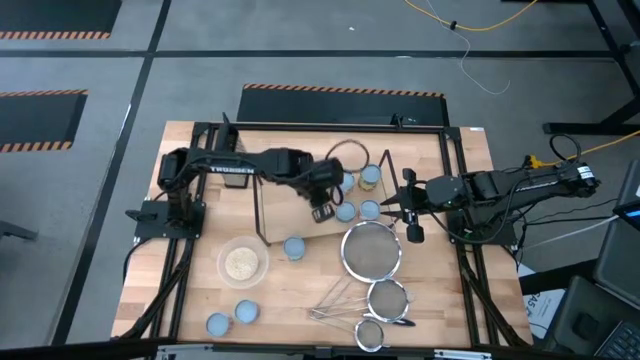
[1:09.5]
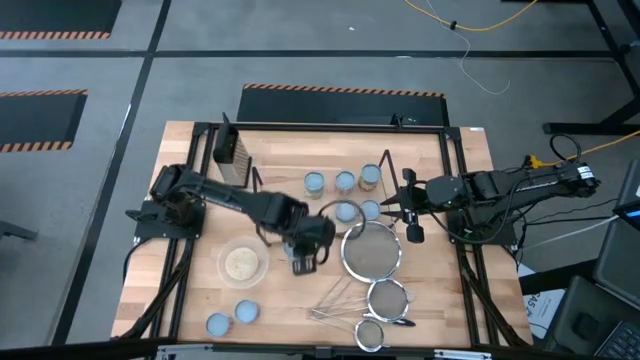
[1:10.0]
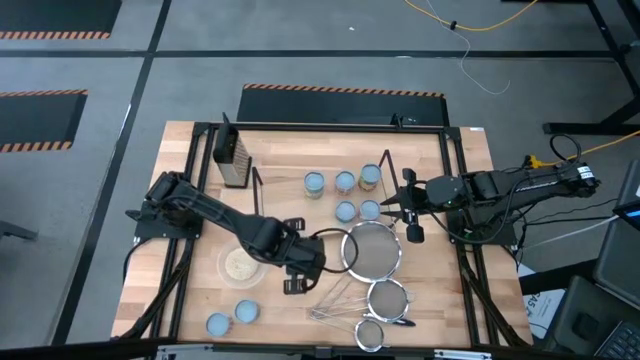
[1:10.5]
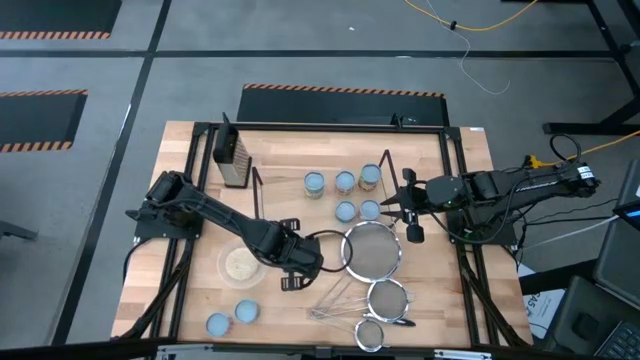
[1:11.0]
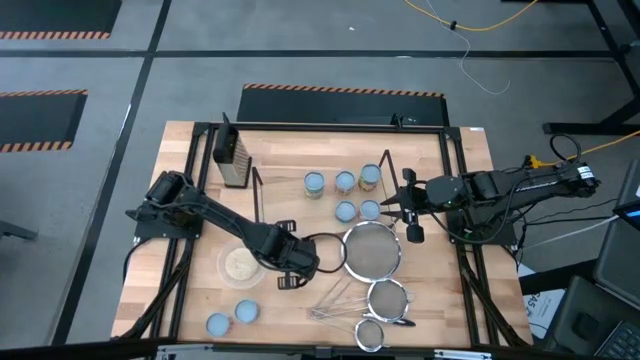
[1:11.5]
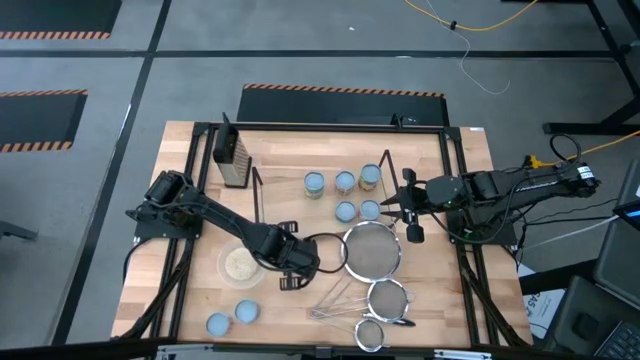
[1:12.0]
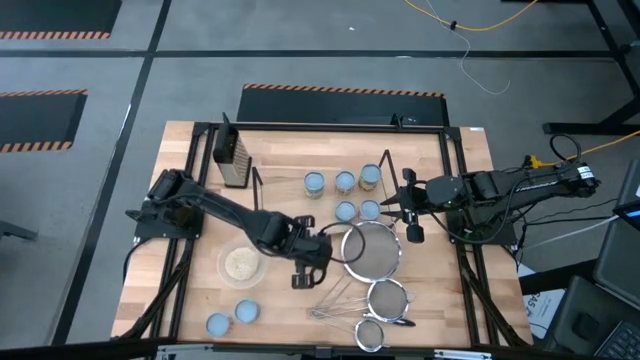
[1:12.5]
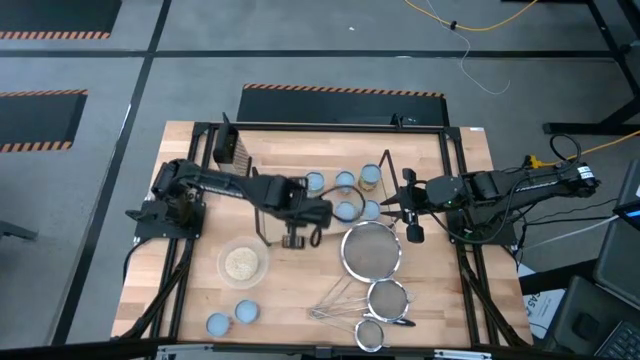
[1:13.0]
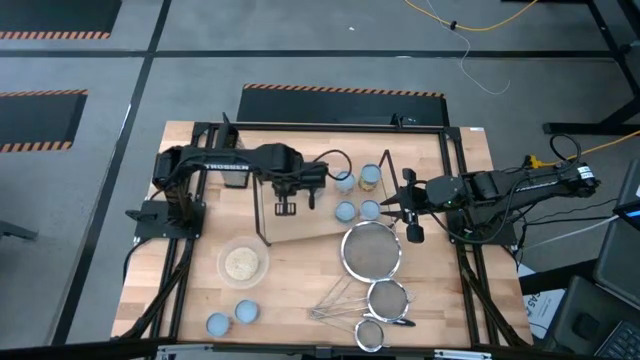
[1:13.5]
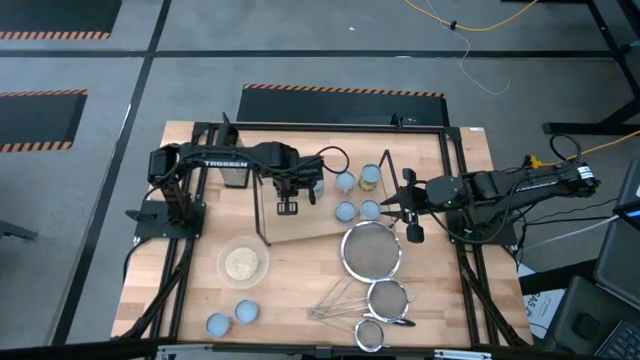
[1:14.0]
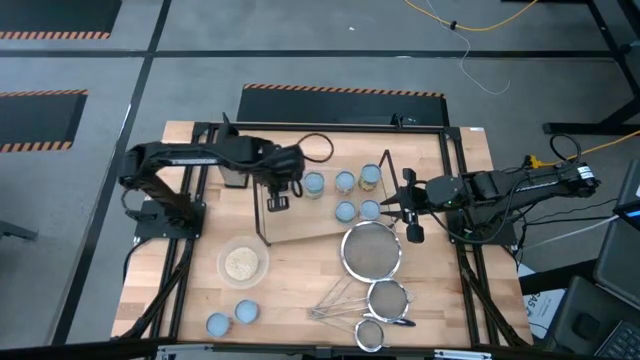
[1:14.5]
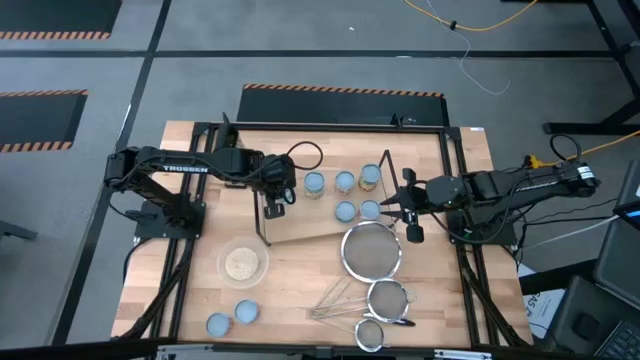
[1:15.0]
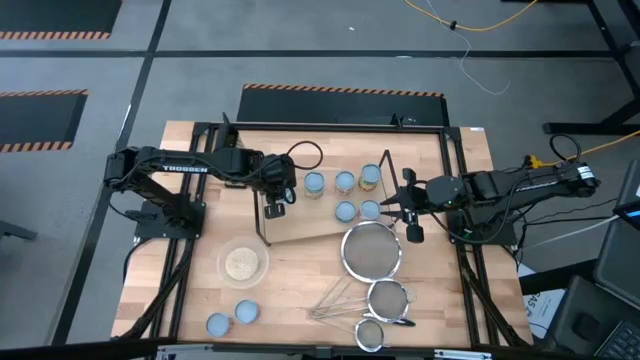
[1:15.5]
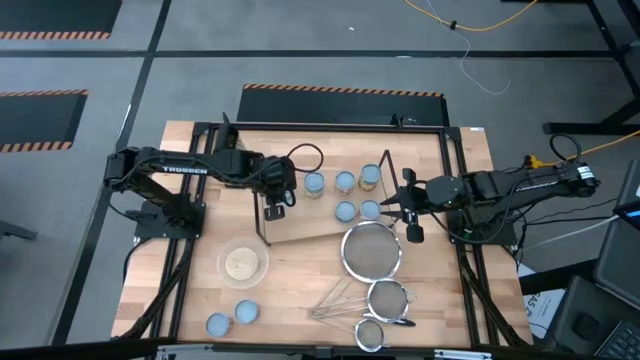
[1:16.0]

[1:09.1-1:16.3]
Task: Pick and place cans onto a shelf
Put the large white can on the shelf

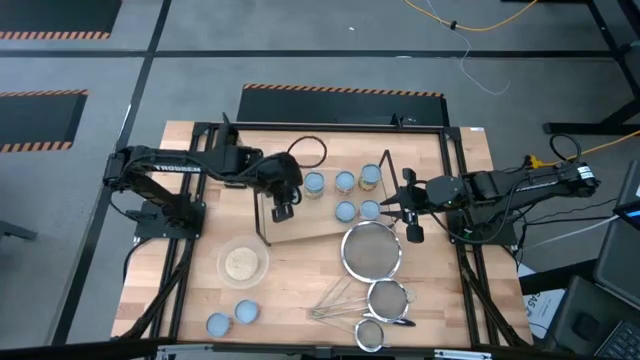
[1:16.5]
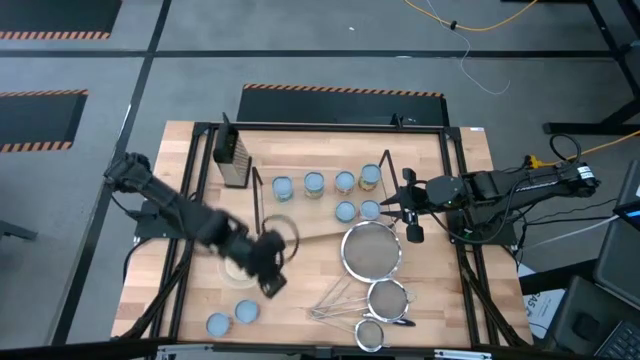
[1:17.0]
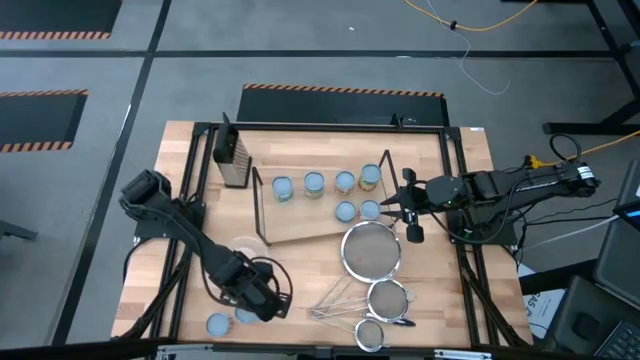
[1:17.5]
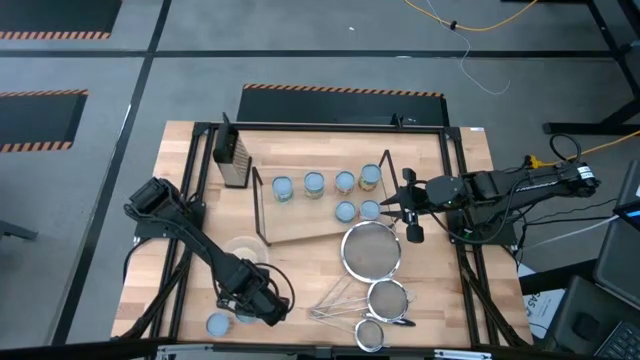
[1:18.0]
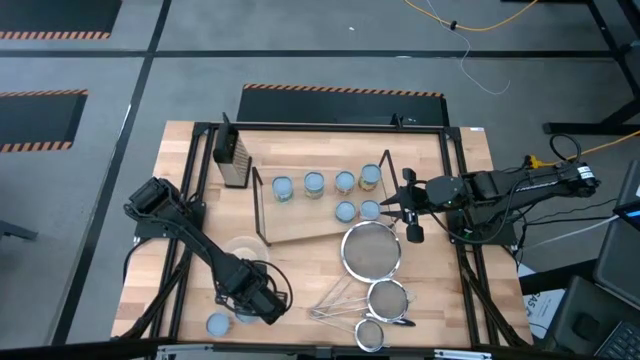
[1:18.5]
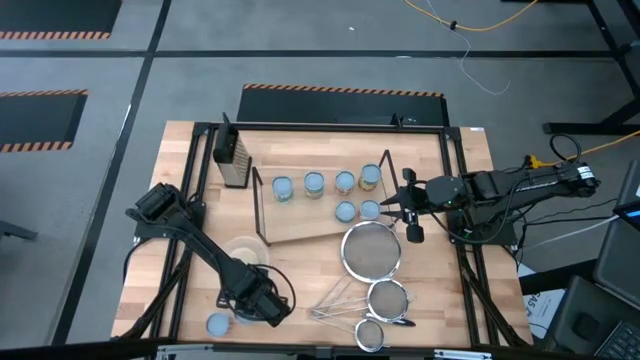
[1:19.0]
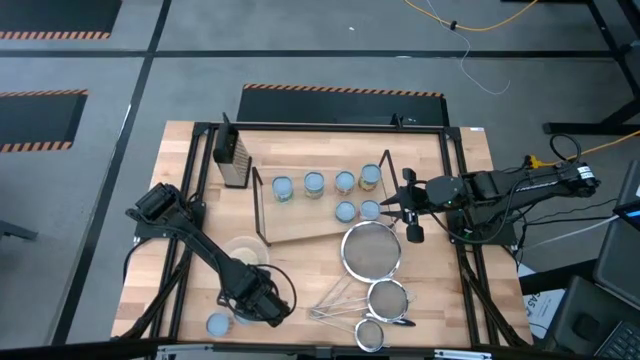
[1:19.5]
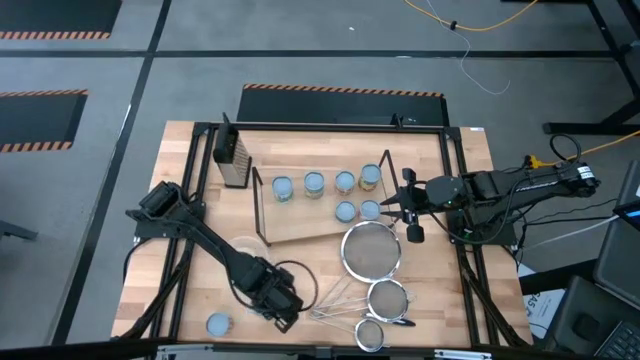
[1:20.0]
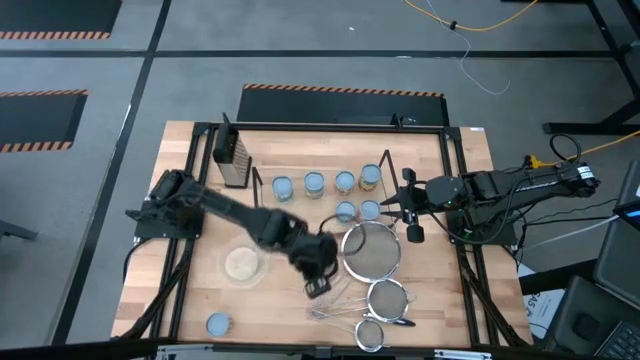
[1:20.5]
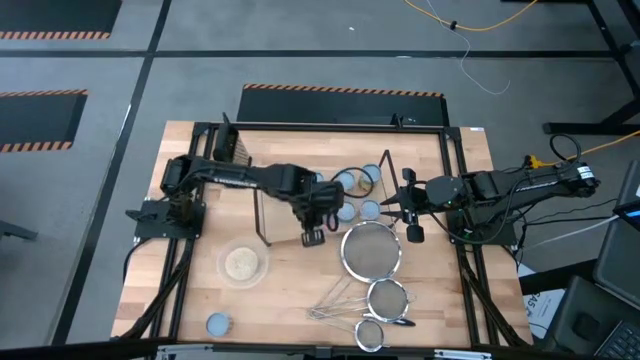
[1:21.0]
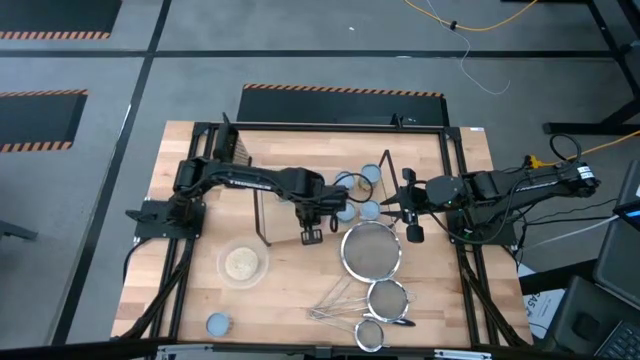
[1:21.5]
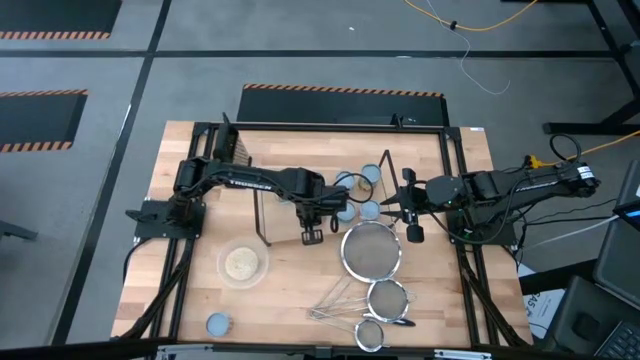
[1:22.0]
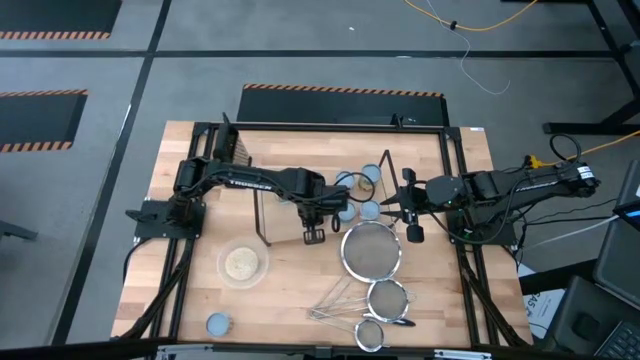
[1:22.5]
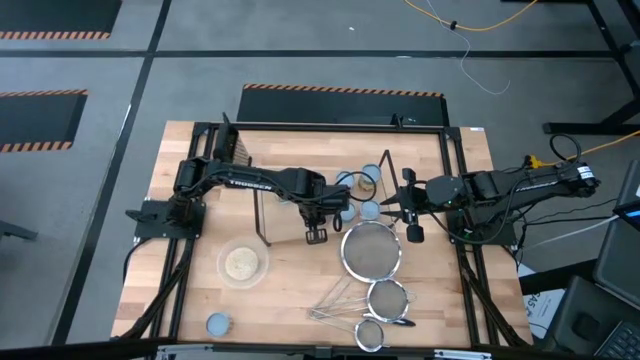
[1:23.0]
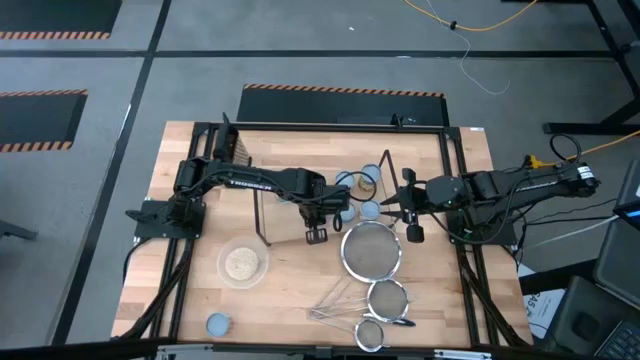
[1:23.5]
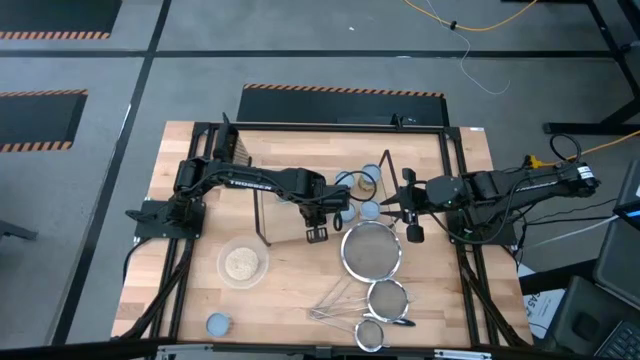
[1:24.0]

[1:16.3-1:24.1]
Put the small blue can on the shelf

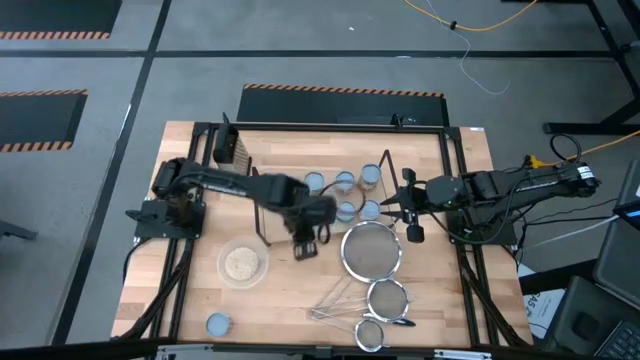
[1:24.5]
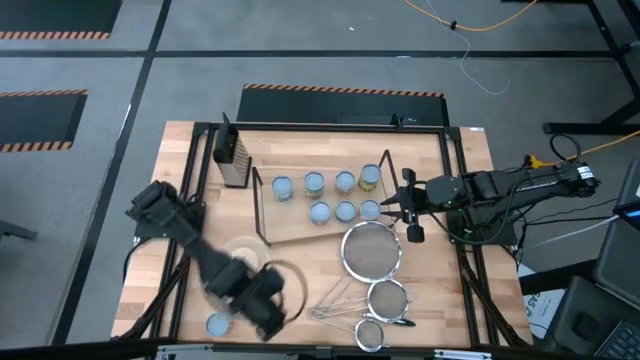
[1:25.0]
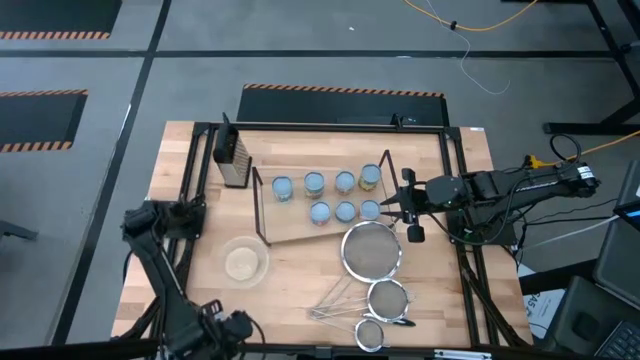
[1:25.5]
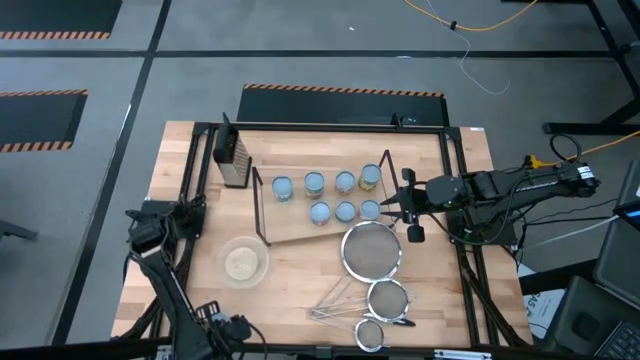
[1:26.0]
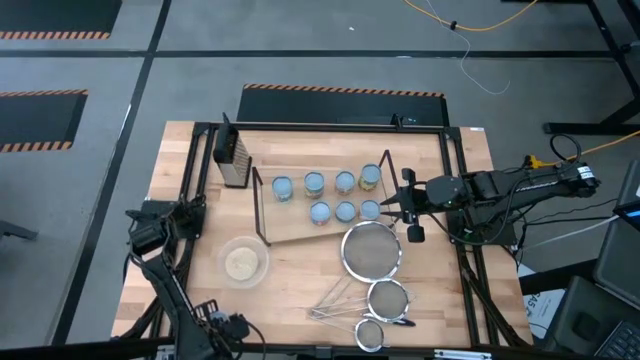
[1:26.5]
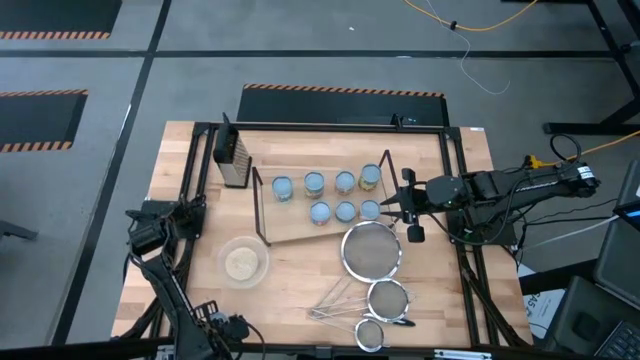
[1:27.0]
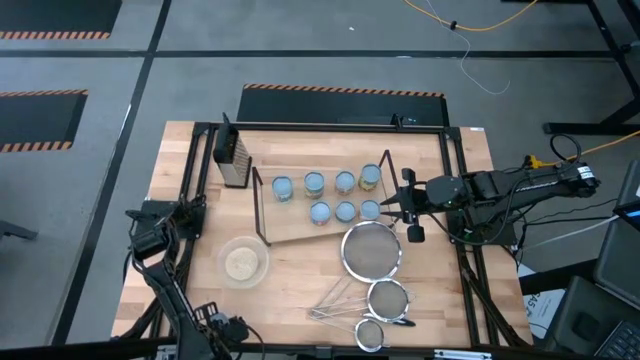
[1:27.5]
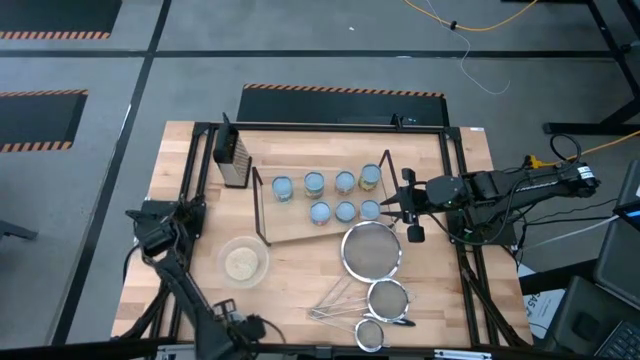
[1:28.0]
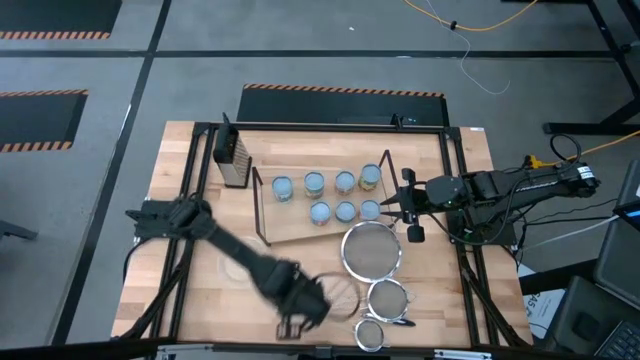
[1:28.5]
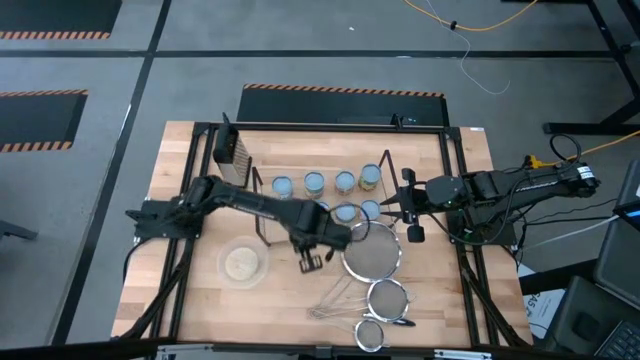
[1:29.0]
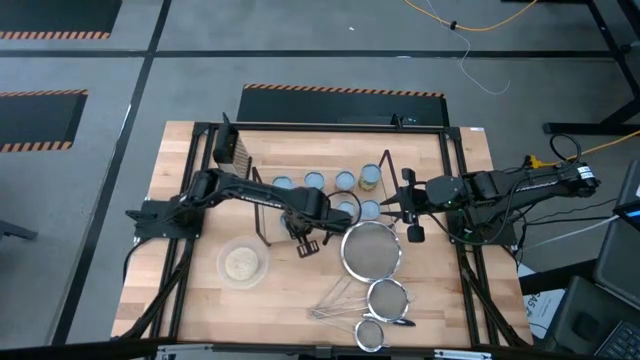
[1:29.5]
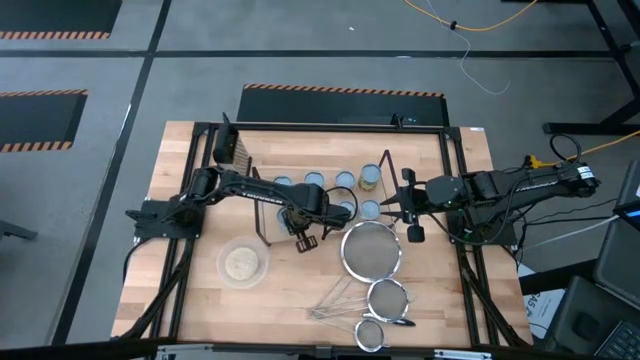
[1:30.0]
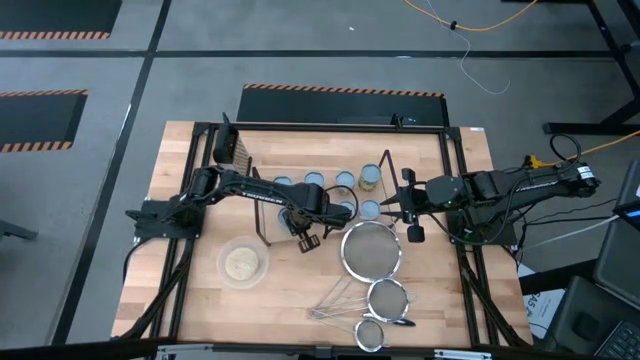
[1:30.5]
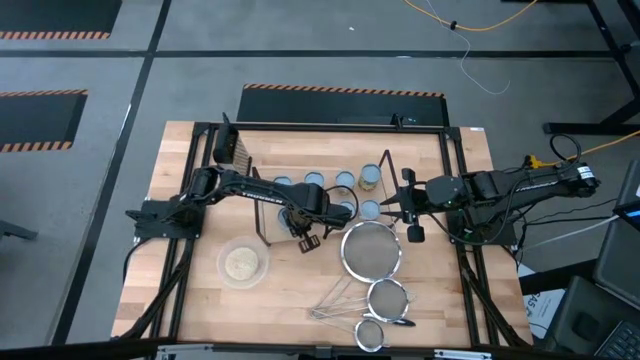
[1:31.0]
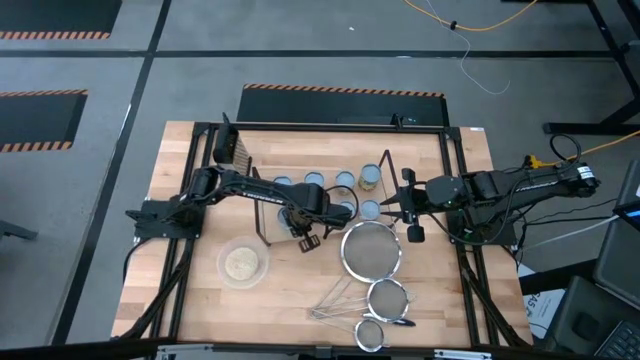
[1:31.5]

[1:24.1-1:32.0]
Put the small white can on the shelf
